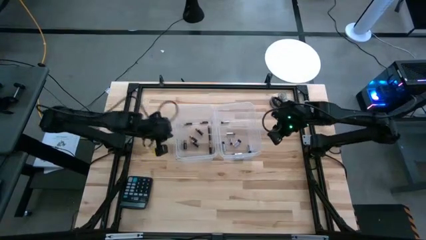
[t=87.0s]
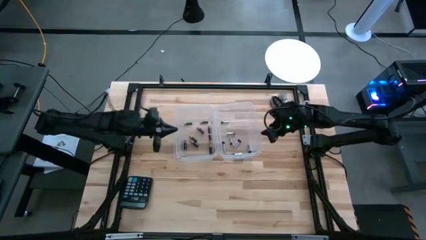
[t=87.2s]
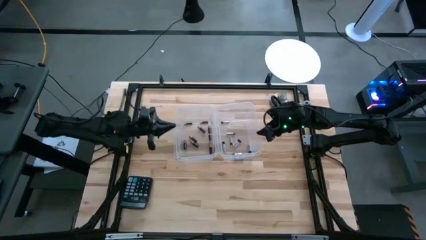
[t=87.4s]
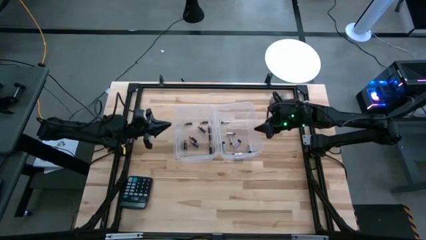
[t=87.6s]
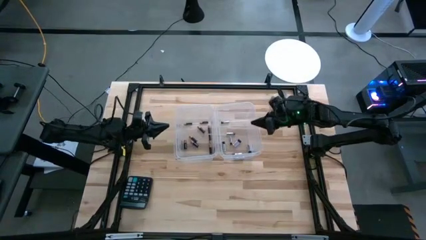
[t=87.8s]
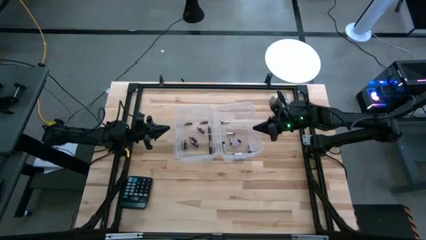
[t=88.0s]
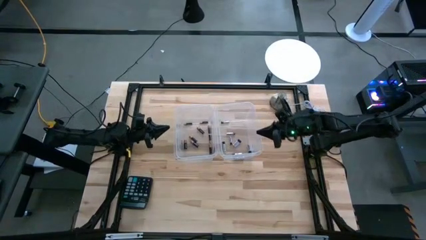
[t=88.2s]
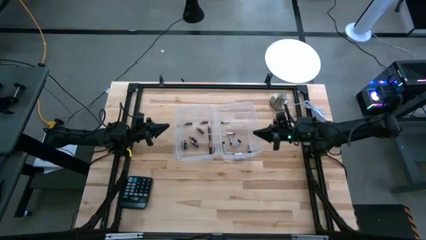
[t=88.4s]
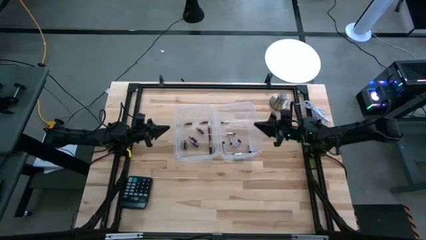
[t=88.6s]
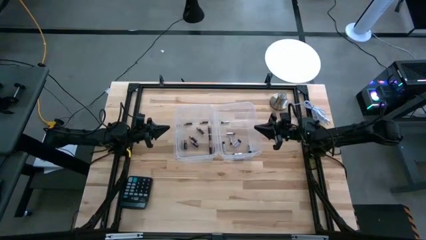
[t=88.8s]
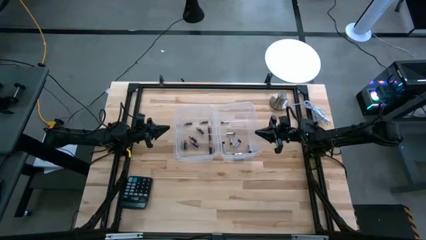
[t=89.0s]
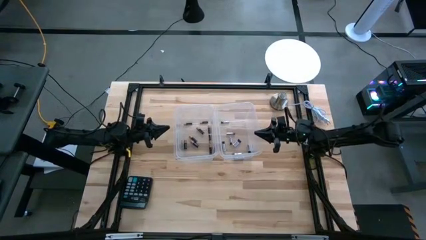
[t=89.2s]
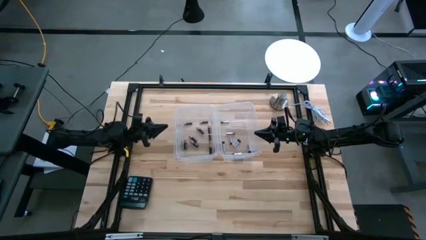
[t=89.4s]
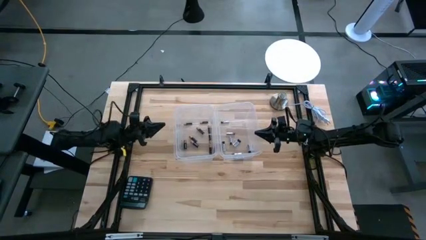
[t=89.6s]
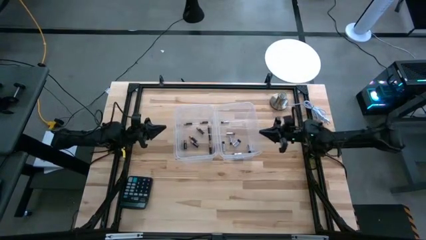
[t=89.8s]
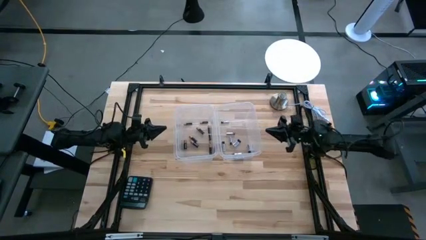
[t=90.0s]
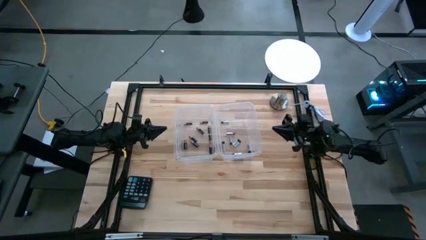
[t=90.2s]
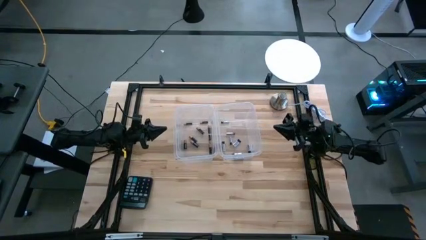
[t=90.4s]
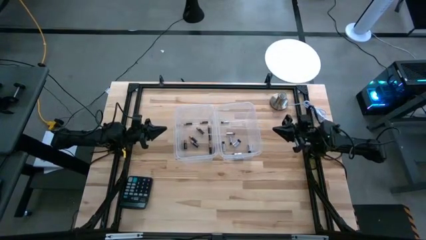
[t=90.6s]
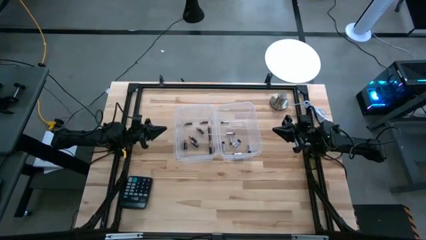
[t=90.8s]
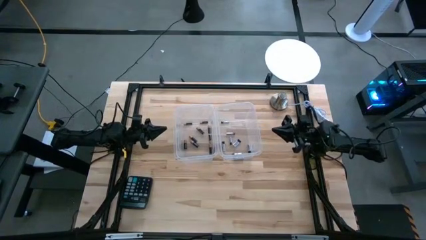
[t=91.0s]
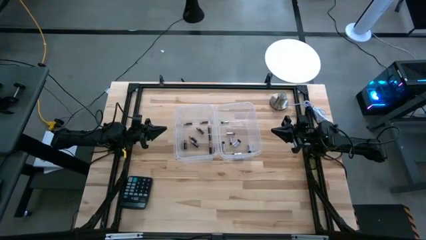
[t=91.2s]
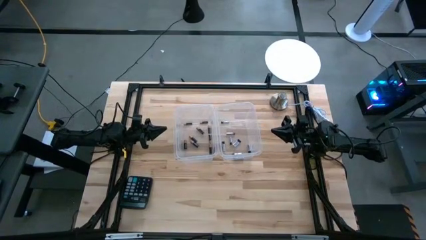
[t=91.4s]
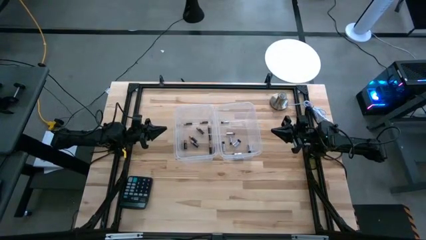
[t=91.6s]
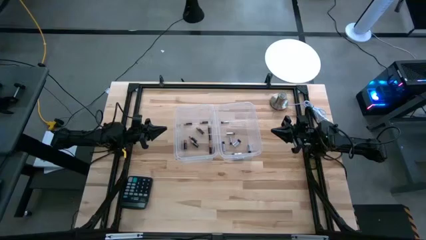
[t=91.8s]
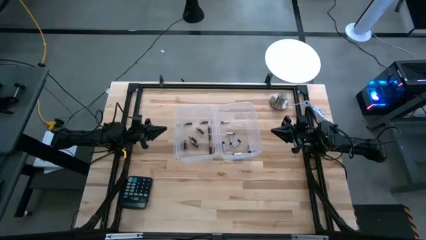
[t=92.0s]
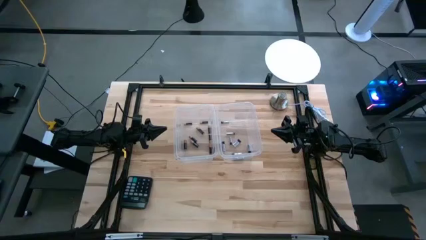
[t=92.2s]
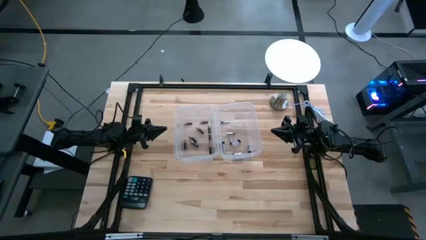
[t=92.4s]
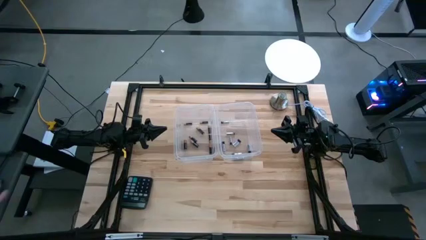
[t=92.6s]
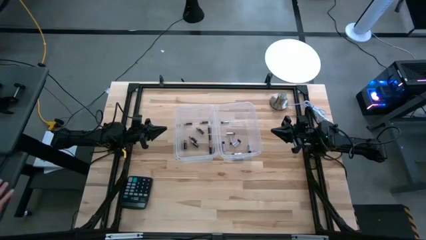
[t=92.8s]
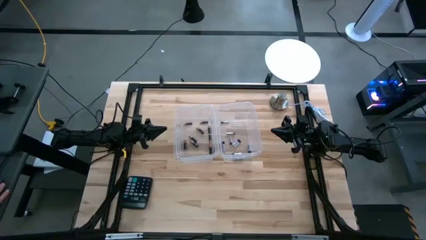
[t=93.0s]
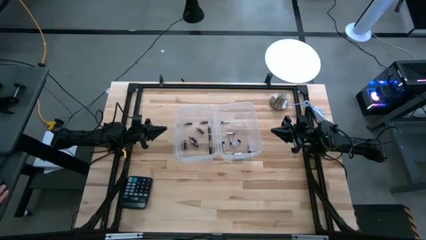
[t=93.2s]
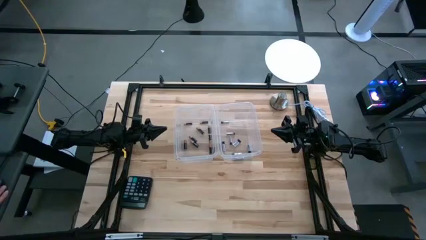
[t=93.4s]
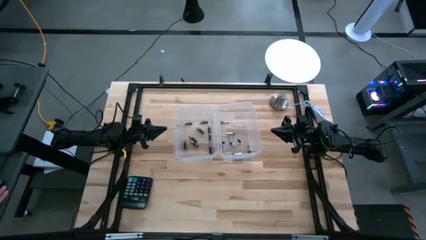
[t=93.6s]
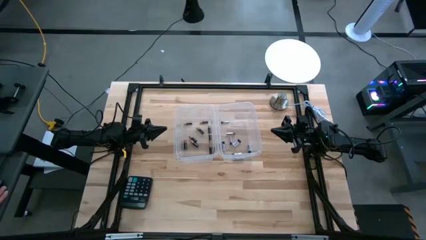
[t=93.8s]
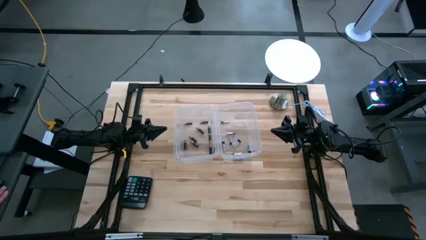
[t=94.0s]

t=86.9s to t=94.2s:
Task: Sort batteries
Return to Home Position

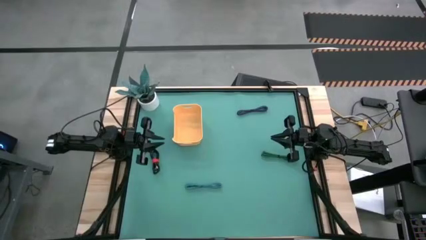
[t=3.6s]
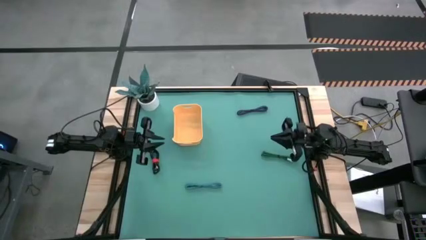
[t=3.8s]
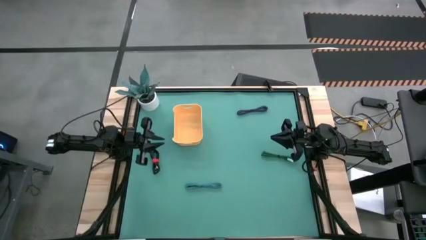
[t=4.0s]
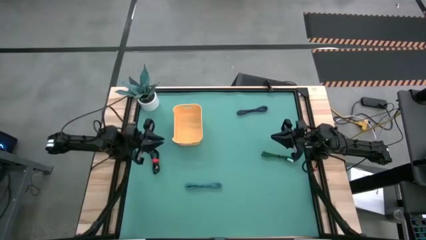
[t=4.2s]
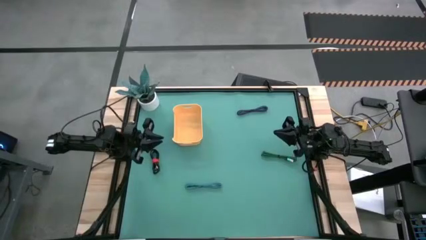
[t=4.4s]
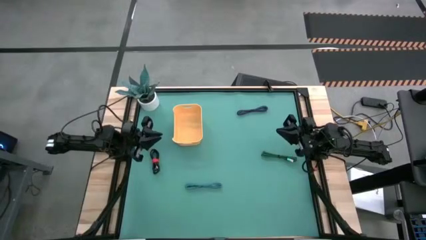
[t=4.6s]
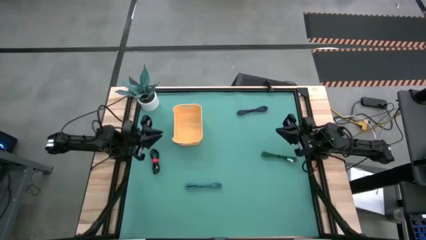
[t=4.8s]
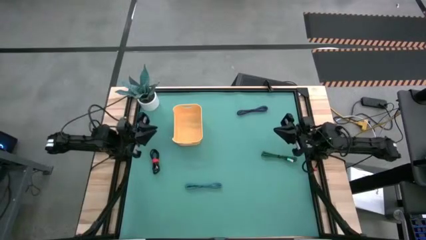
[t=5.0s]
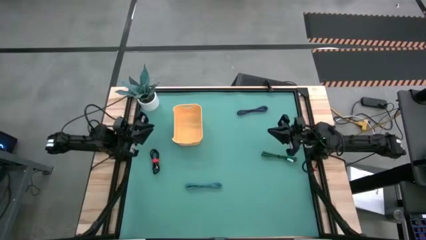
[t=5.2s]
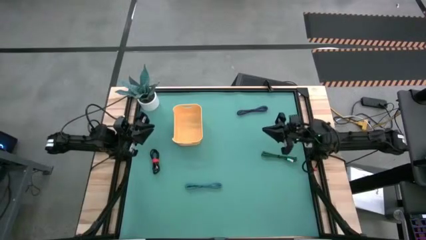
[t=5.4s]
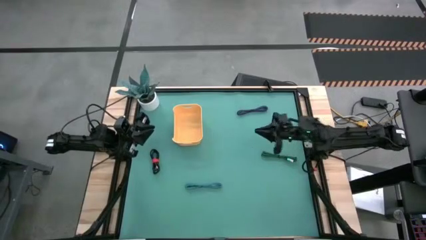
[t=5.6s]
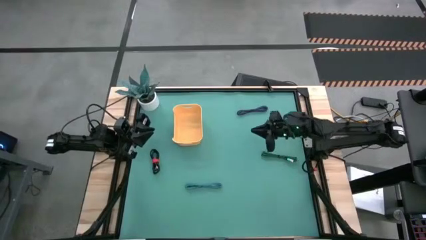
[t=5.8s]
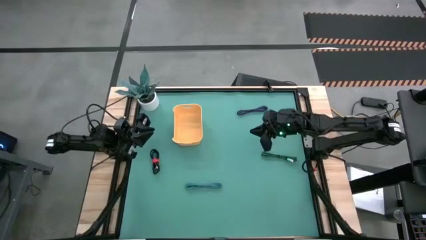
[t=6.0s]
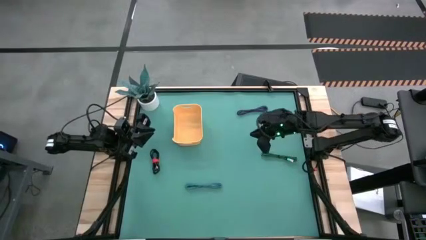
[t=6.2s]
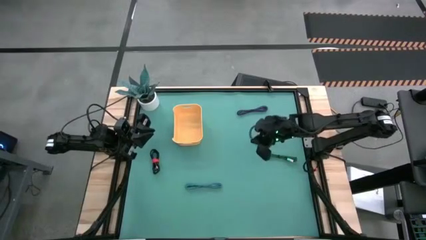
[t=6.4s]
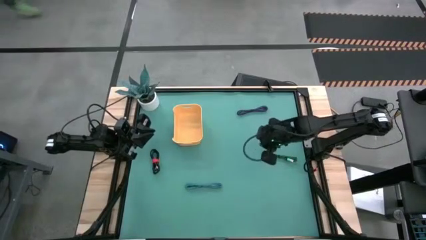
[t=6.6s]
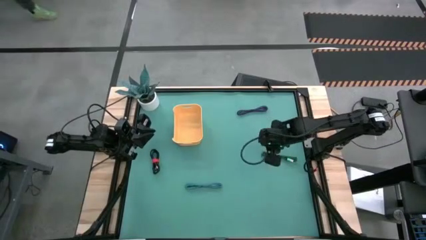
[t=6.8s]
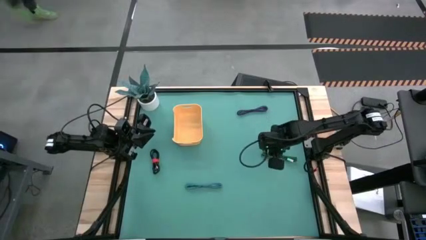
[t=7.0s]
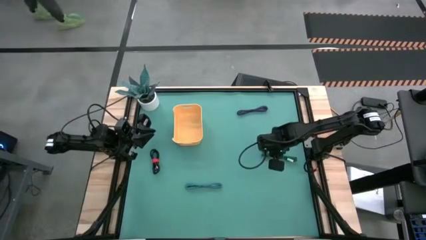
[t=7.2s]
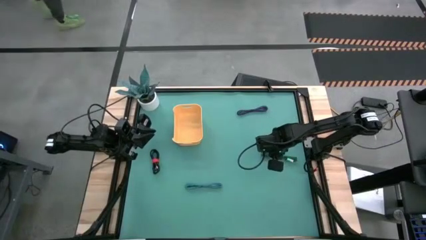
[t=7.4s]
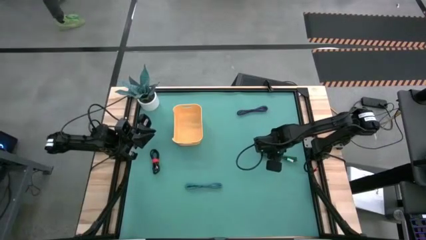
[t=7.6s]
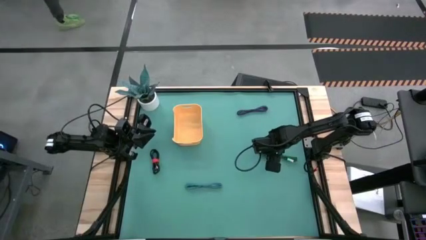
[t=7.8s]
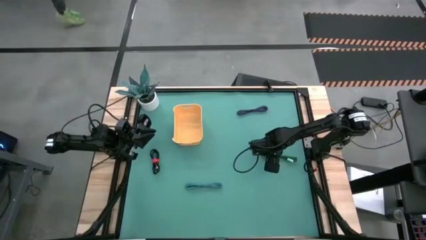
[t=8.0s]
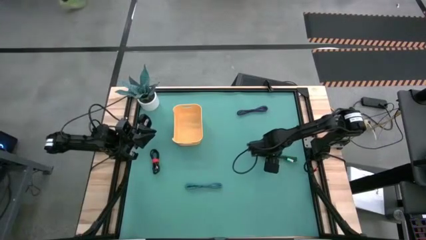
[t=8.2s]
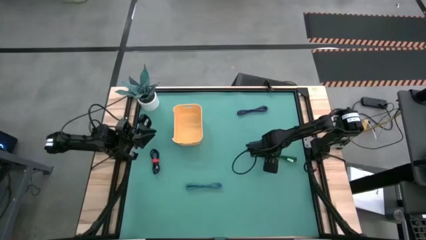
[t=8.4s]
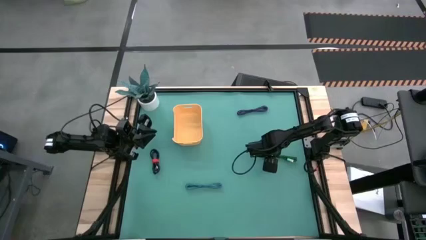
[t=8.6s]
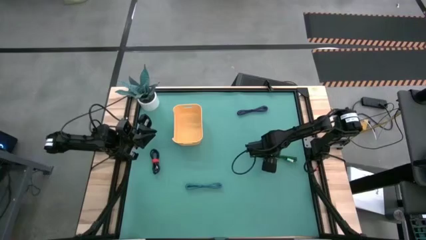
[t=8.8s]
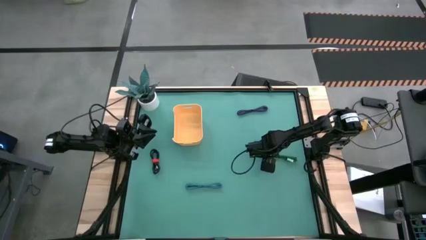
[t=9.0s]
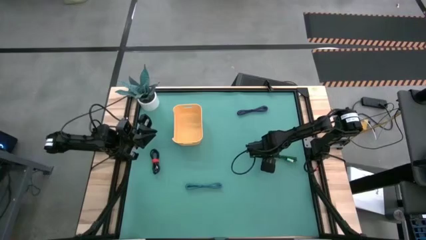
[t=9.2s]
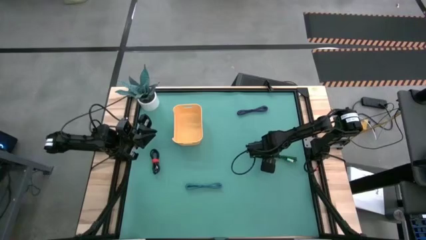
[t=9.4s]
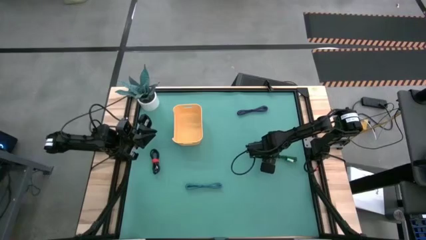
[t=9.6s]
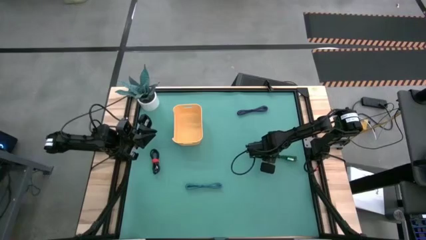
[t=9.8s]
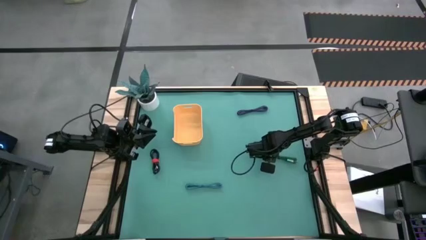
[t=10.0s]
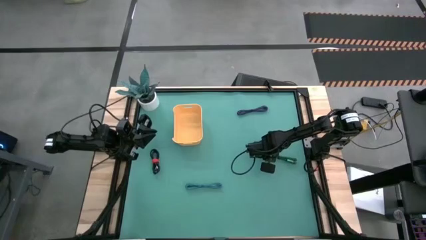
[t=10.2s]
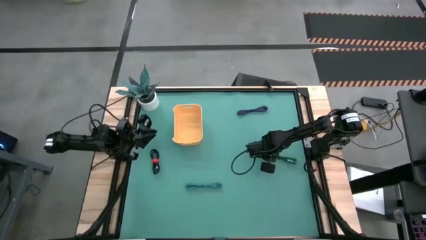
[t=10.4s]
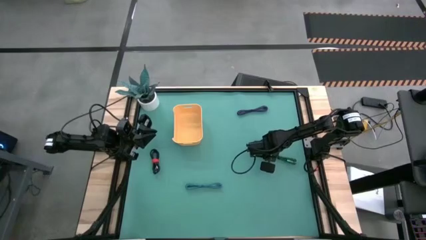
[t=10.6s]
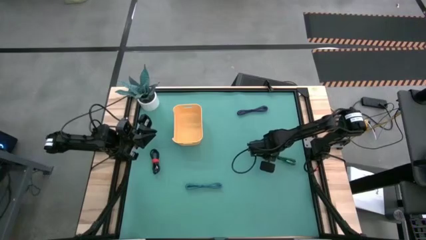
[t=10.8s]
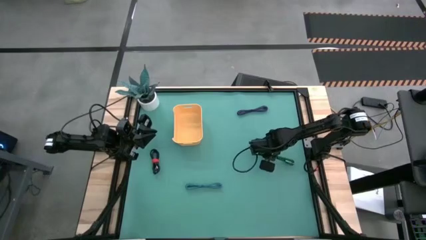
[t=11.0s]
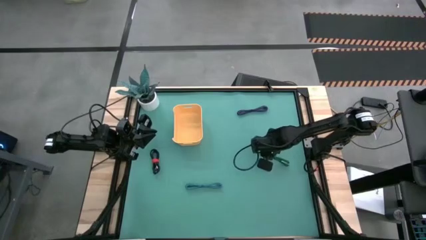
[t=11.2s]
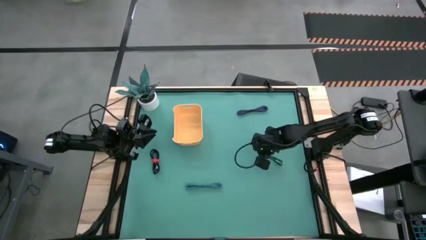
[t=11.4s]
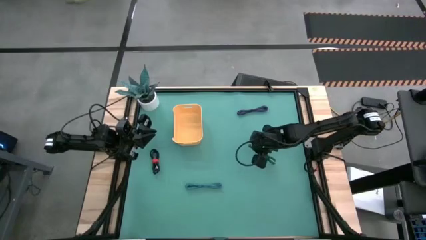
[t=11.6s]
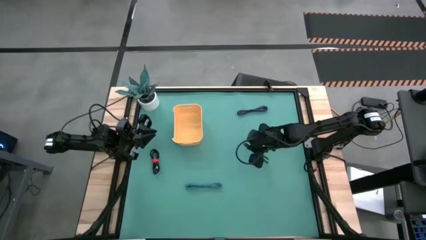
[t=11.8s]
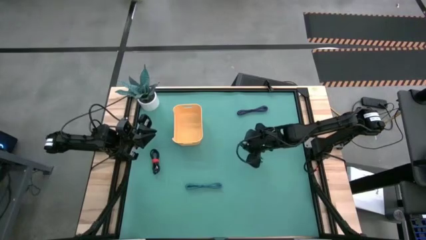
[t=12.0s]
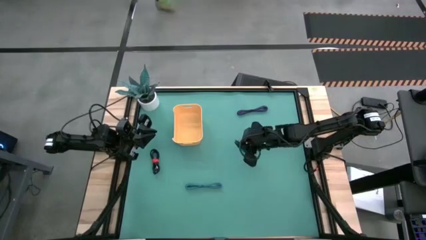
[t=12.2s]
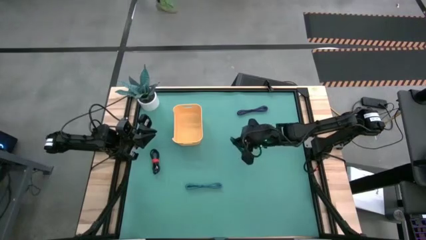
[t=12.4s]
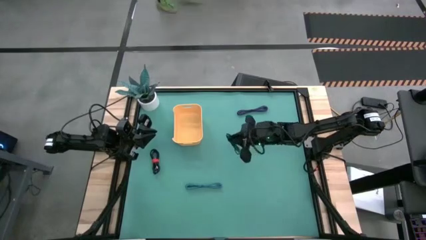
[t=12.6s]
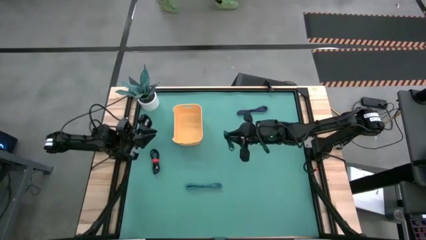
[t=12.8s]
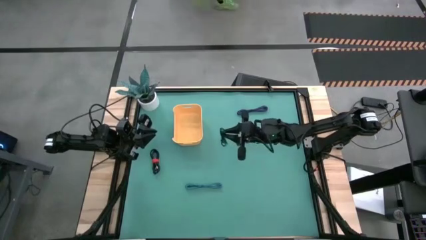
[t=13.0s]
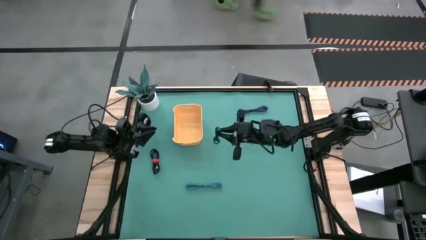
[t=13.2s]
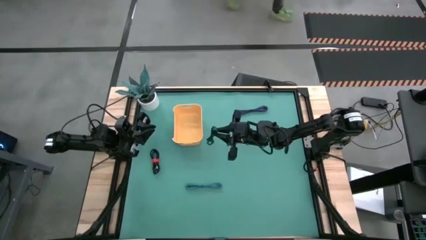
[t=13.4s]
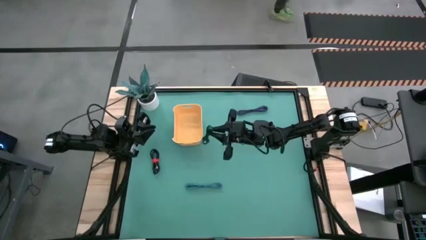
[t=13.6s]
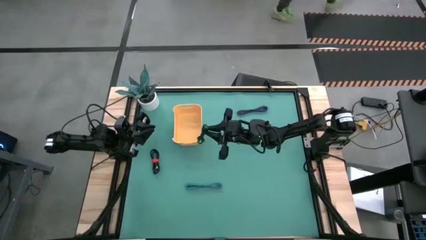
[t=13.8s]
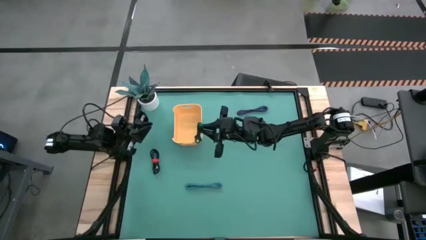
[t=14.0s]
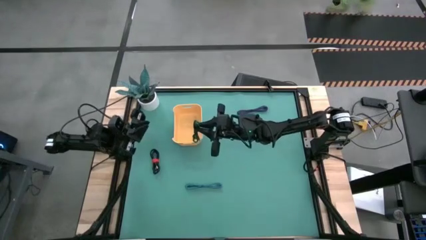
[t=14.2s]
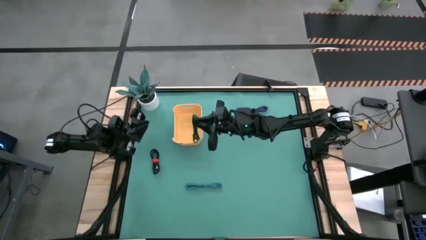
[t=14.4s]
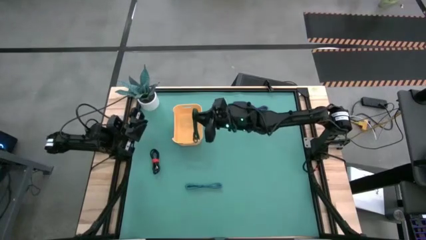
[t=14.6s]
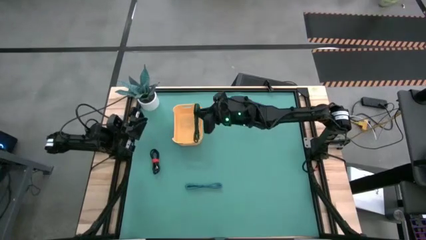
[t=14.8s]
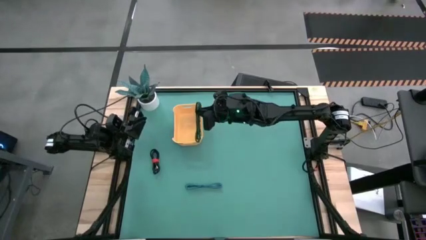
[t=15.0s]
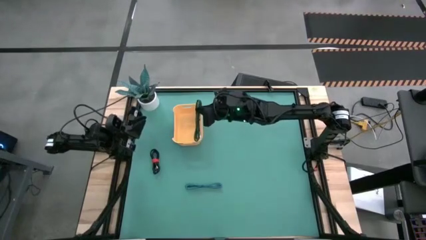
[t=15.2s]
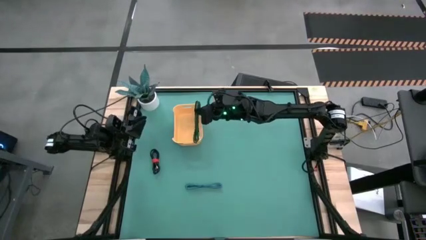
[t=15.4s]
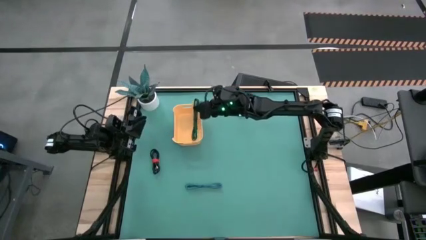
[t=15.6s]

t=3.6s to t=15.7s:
Task: Pick and place USB-C Cables
Put the green USB cable into the yellow bin
